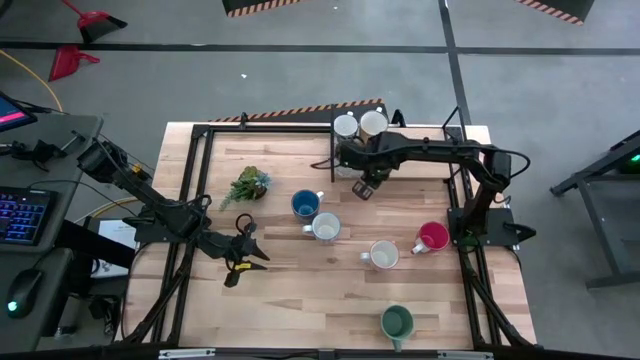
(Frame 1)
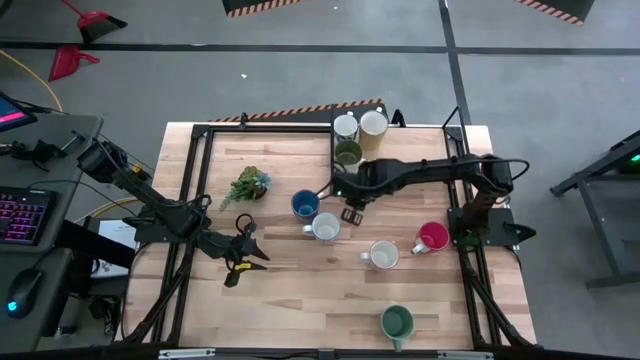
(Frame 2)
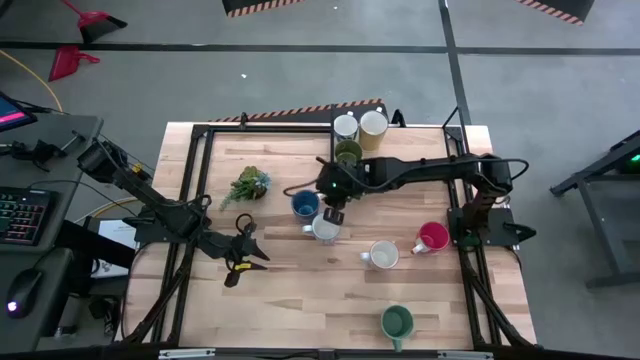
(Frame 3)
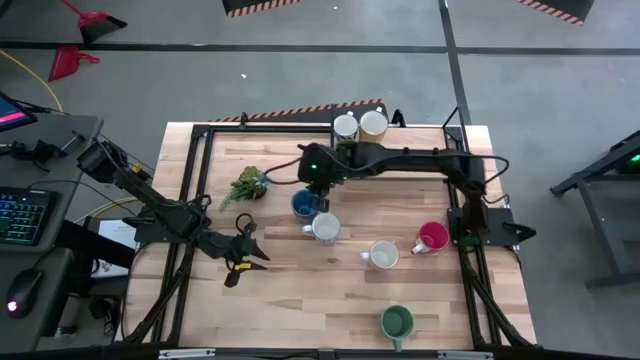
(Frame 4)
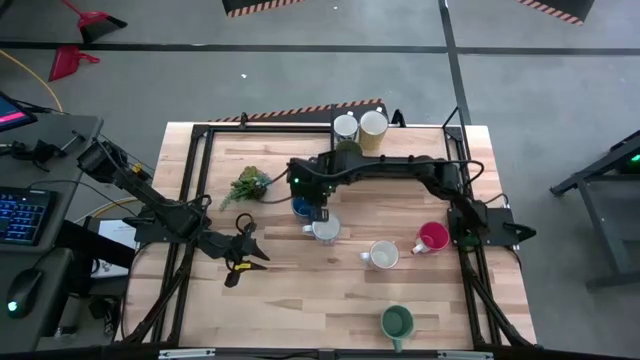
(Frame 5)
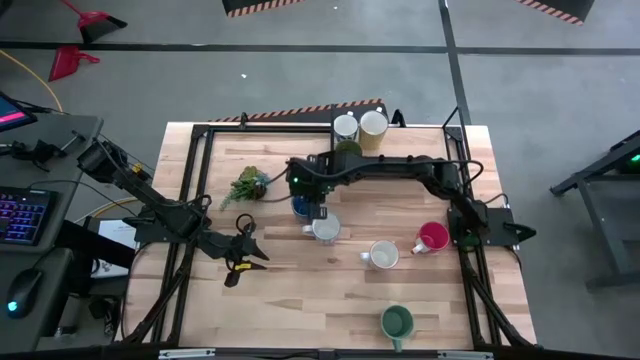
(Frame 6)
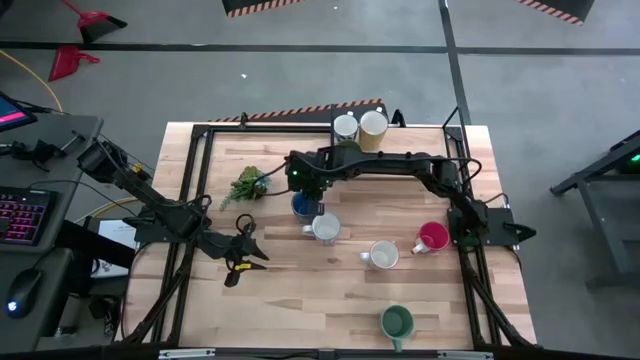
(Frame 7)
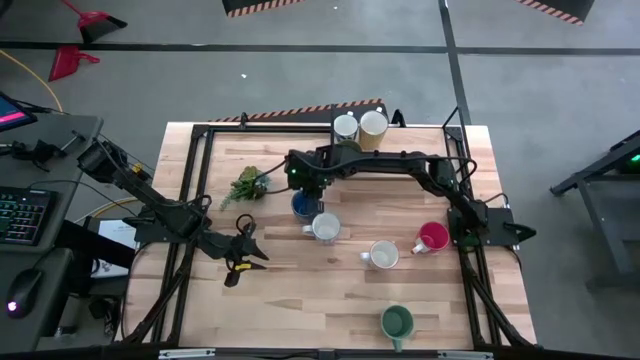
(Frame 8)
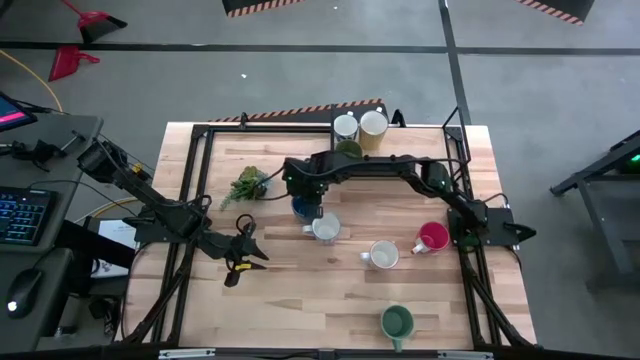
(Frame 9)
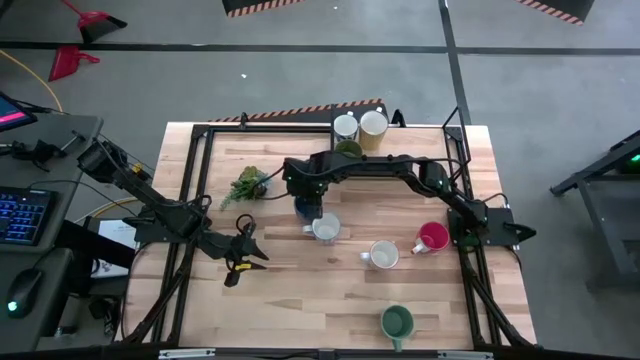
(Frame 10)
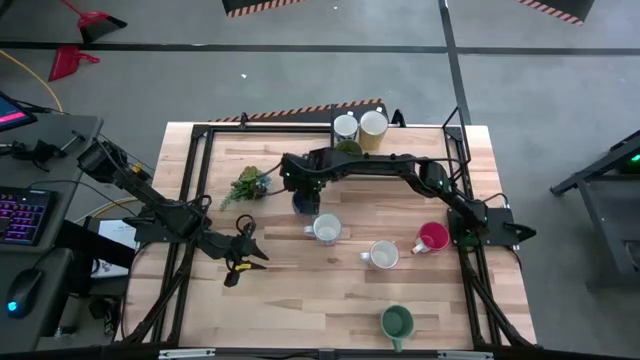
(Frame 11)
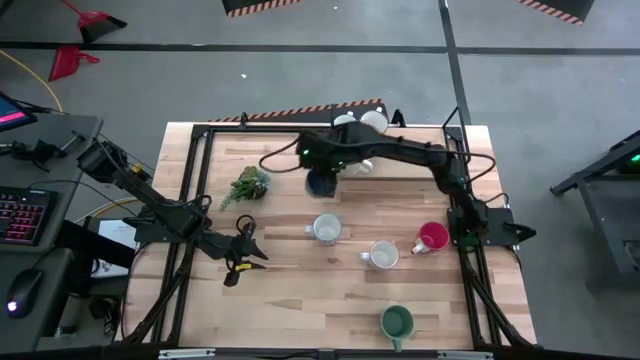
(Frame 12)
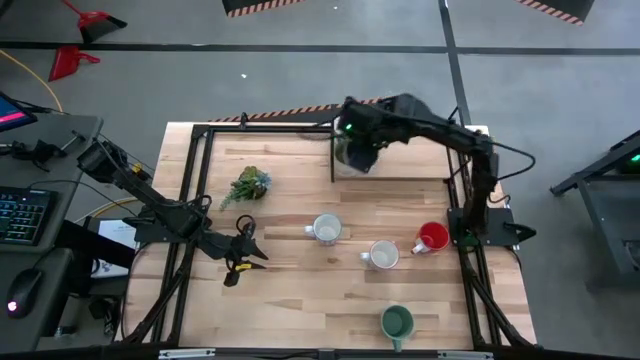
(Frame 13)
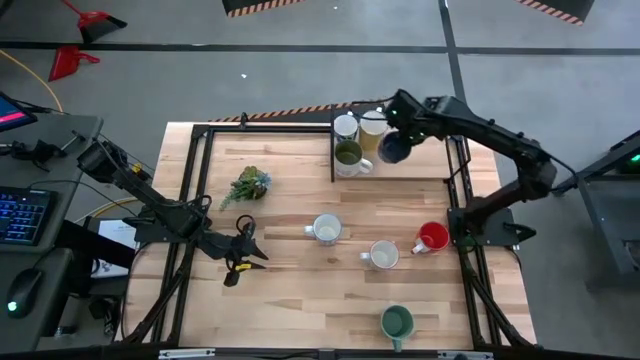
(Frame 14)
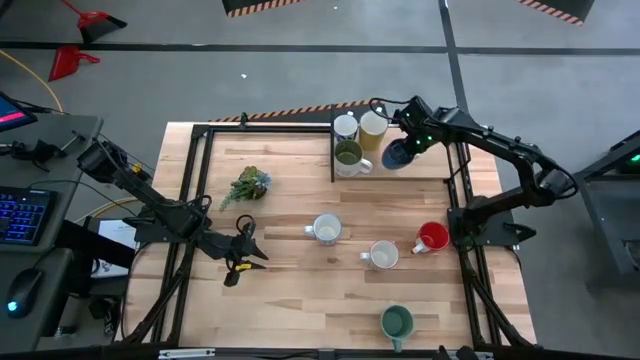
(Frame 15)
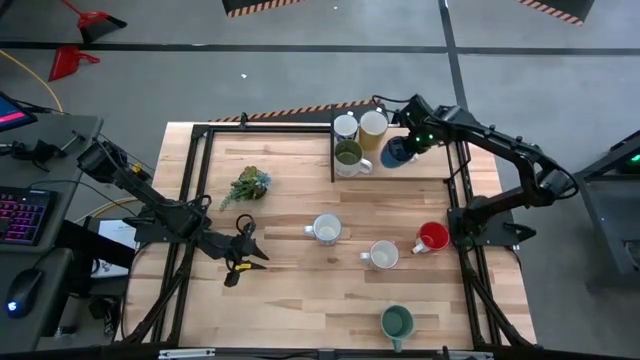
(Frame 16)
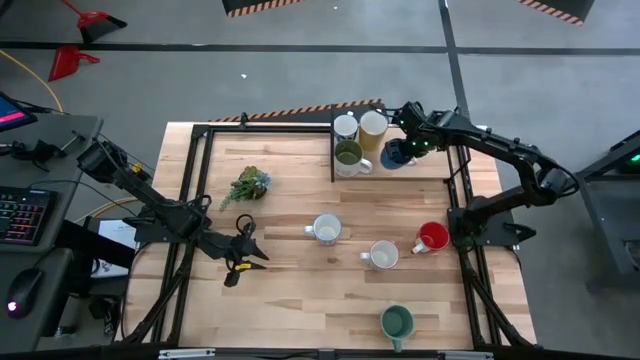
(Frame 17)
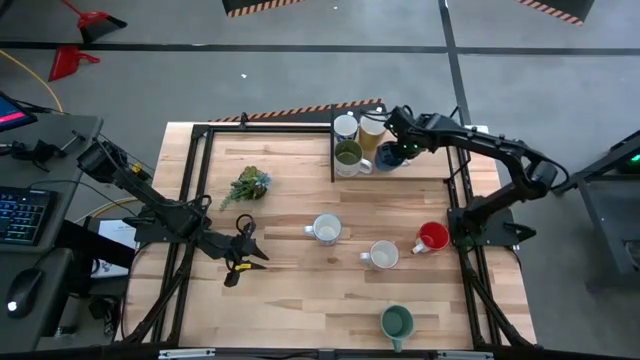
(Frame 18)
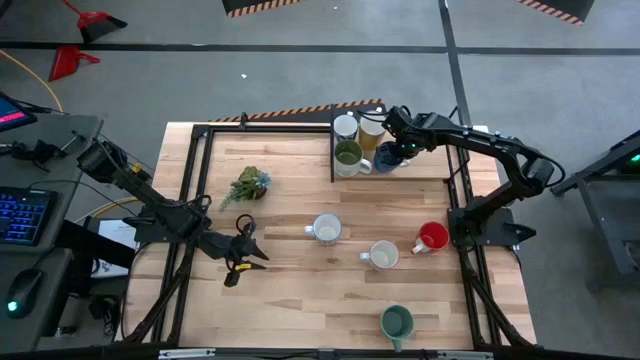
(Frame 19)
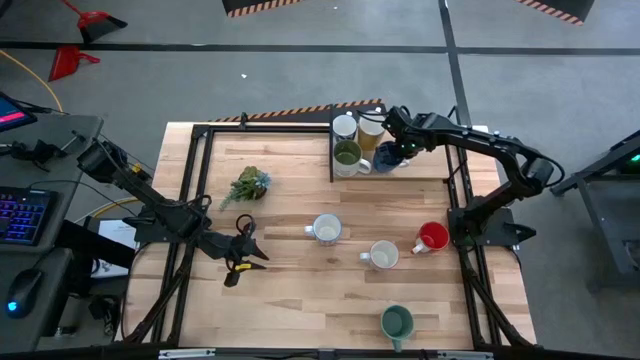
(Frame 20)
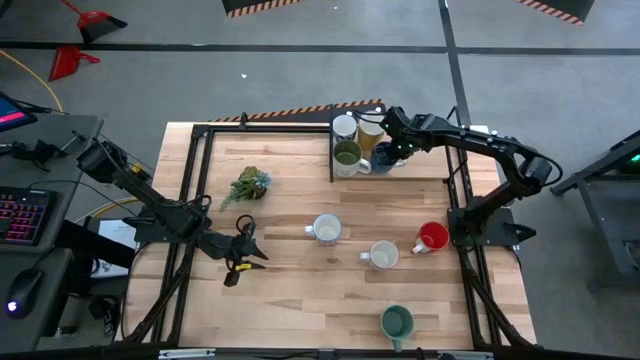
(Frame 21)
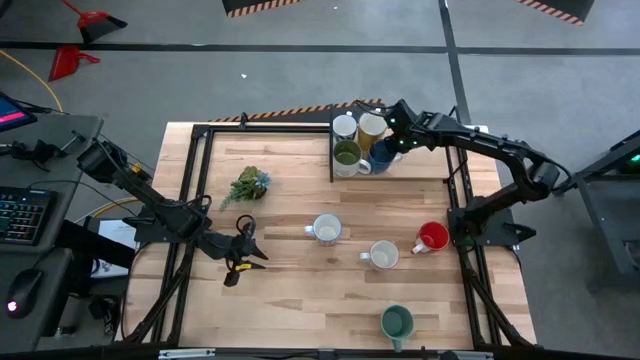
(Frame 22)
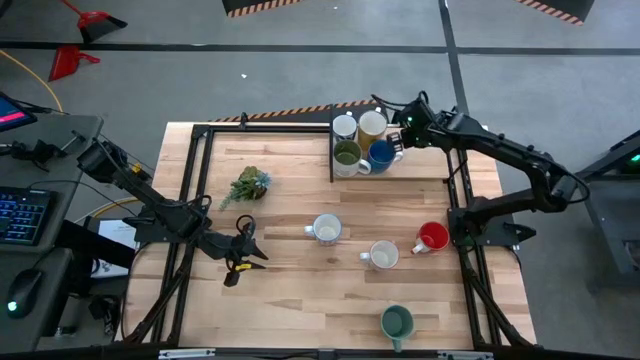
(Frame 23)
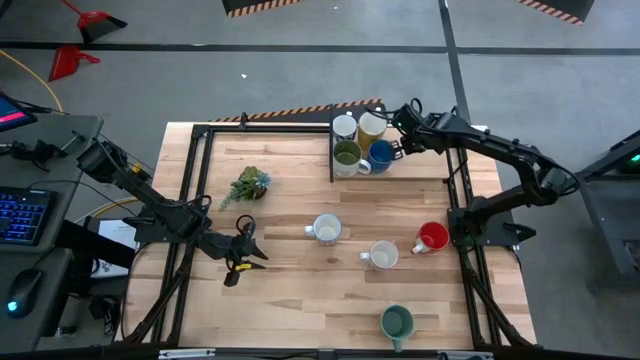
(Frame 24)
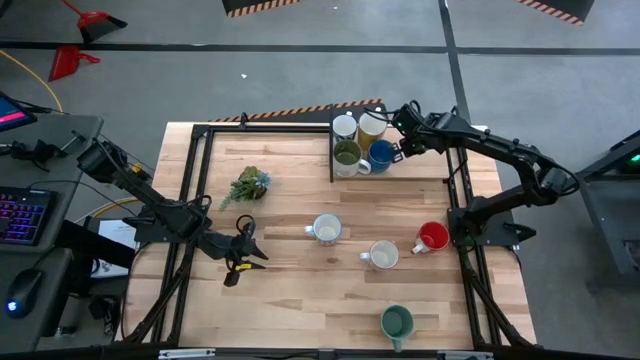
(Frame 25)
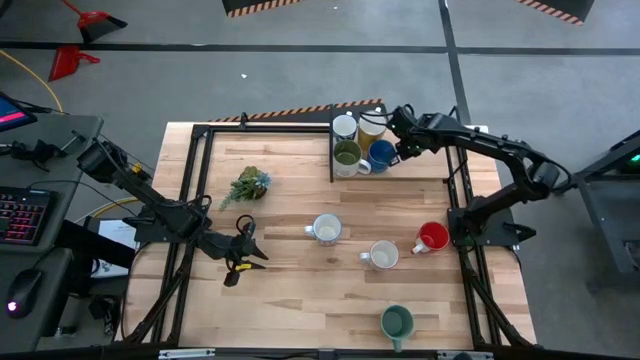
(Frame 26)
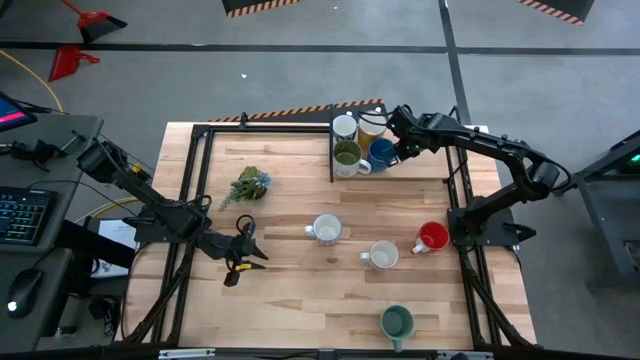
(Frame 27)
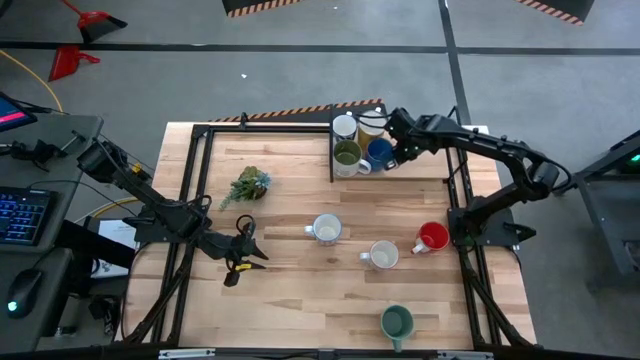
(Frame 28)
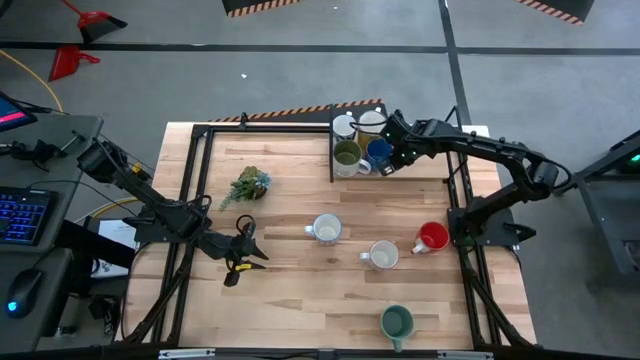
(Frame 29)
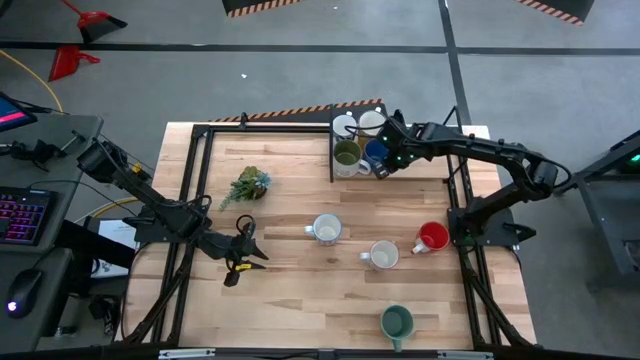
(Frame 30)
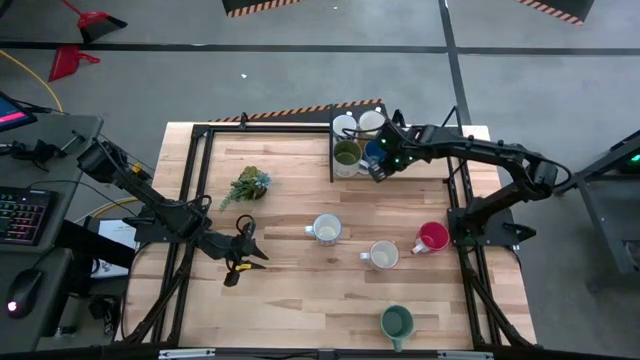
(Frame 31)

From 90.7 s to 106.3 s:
Task: Place coffee mugs
Put the blue mug on the shelf

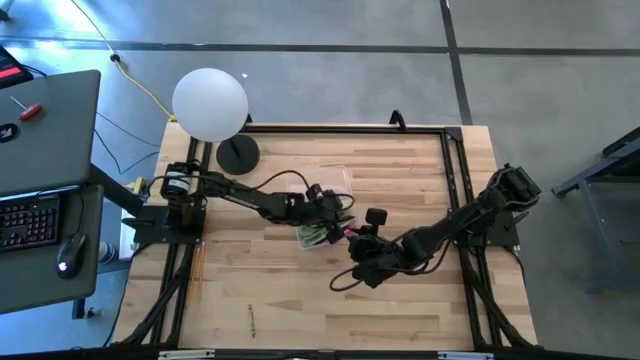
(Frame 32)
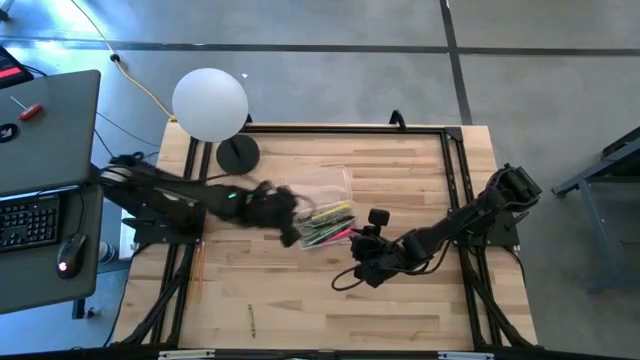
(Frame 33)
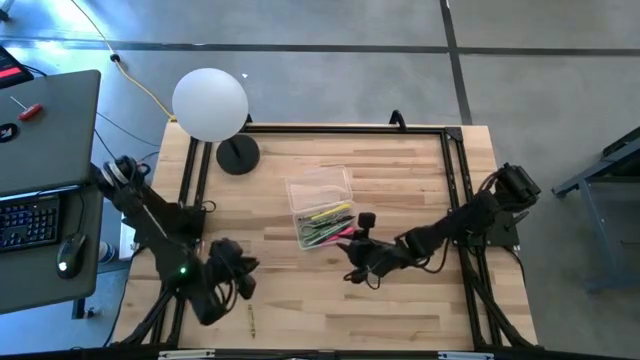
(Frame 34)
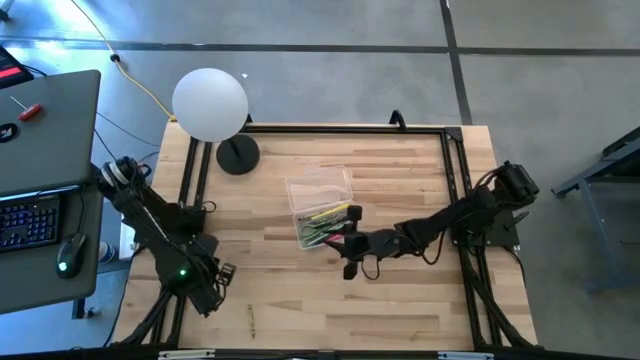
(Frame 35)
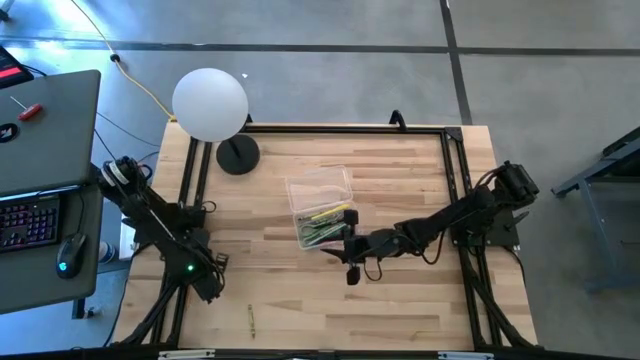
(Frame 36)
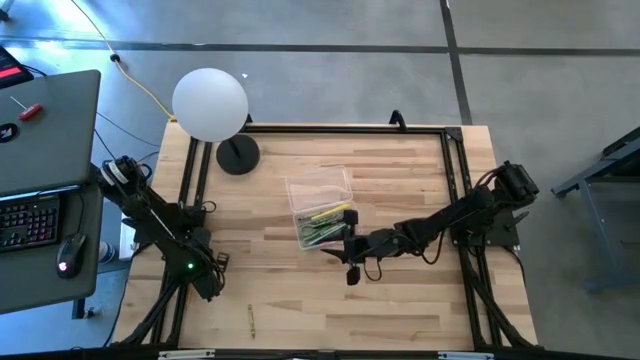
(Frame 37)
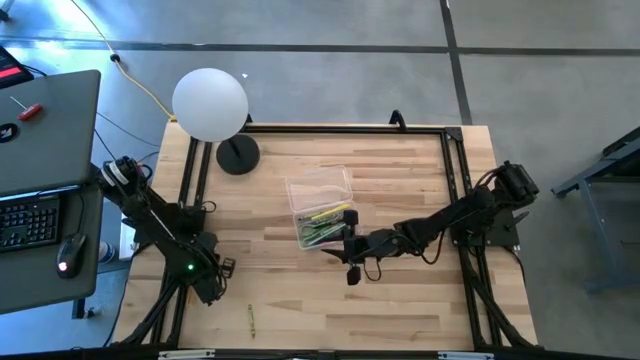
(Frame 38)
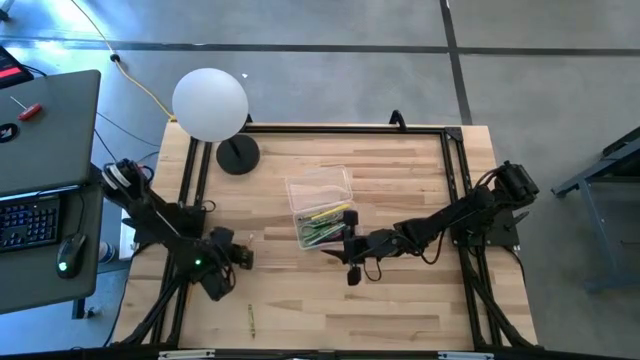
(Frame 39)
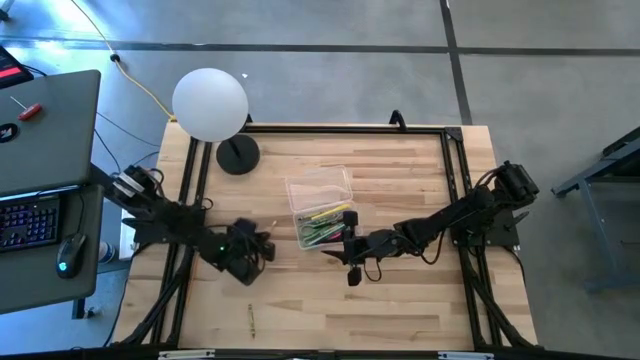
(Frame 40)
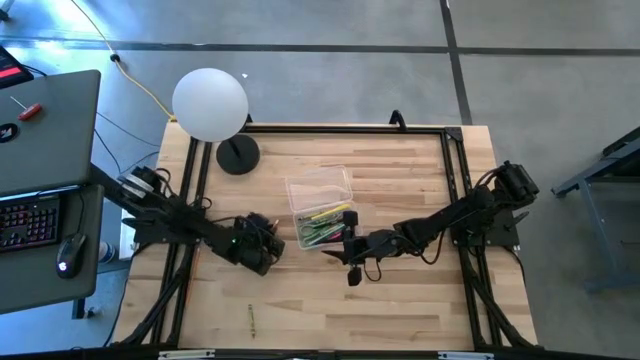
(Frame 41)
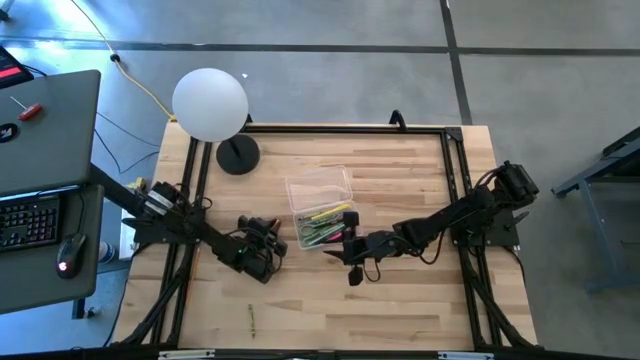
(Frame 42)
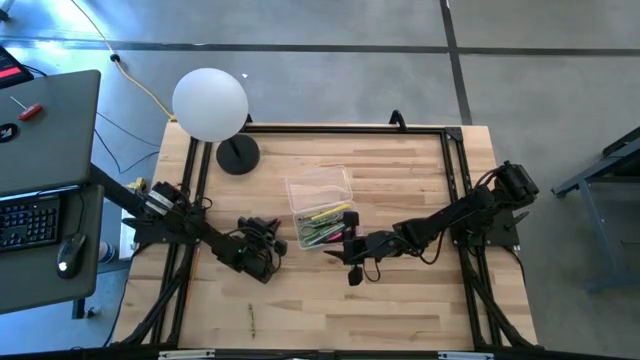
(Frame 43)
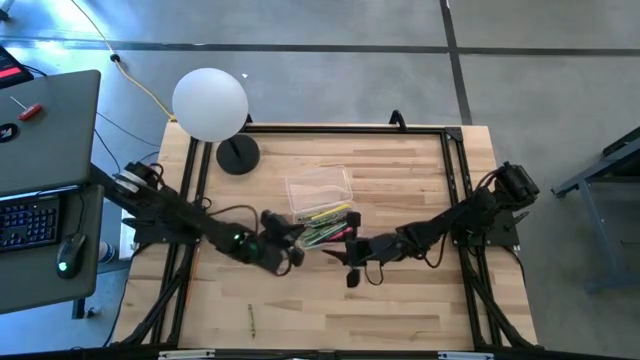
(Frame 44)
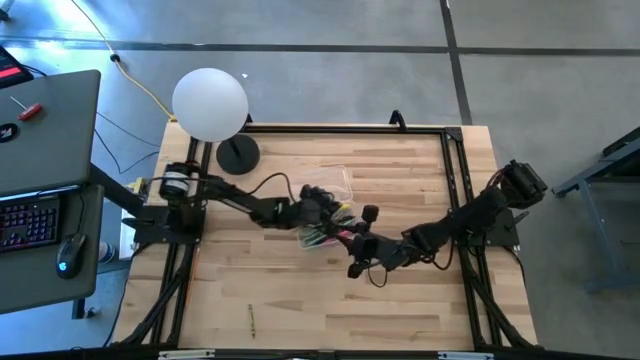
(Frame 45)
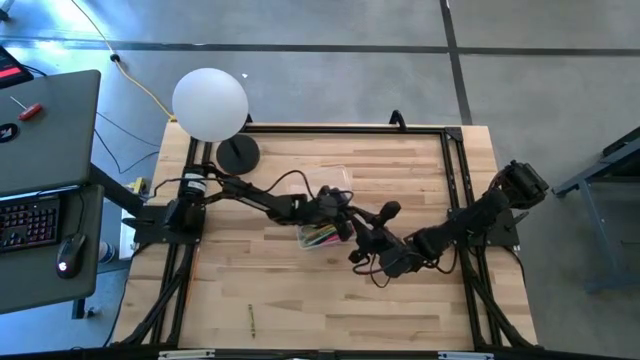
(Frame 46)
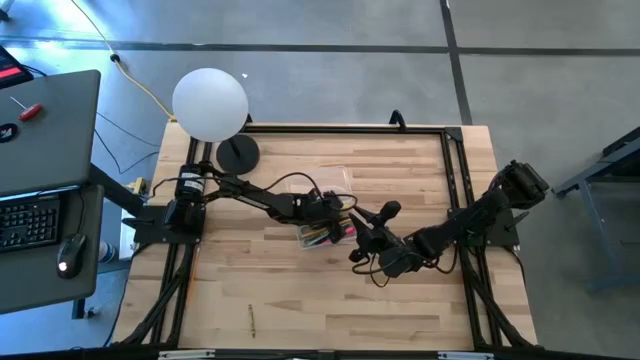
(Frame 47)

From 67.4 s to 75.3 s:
Task: Pick & place school supplies into a supply box
Put the yellow pencil into the transparent supply box
